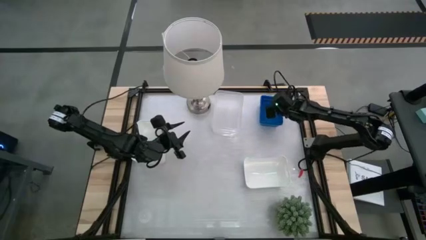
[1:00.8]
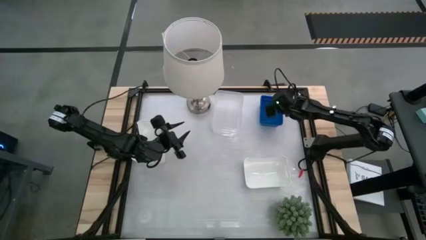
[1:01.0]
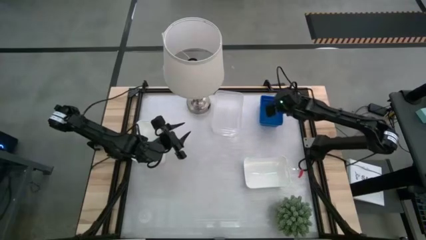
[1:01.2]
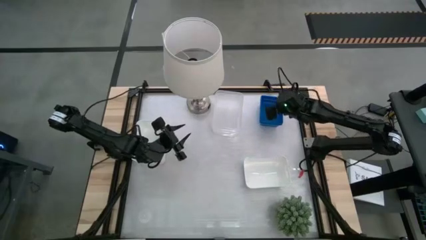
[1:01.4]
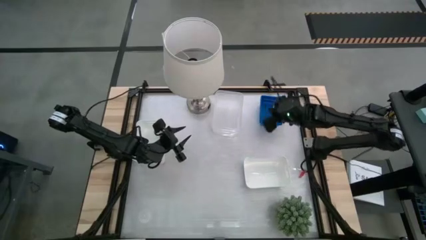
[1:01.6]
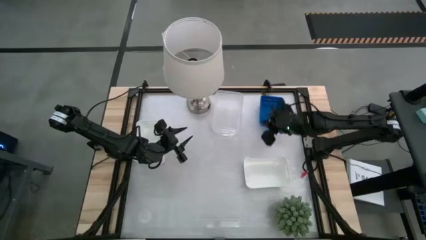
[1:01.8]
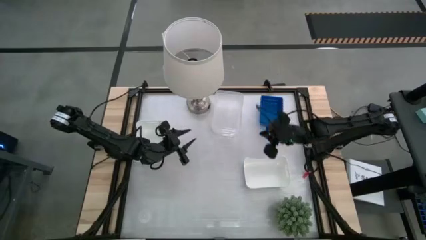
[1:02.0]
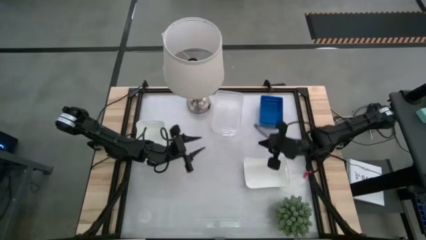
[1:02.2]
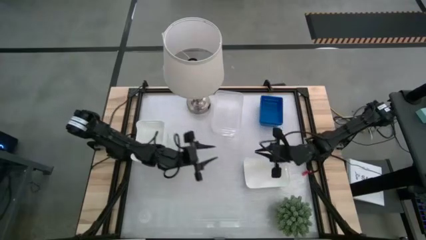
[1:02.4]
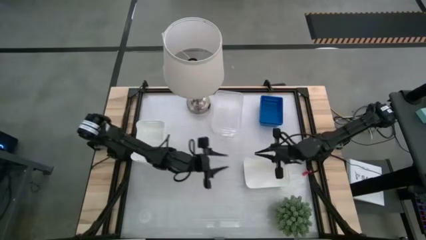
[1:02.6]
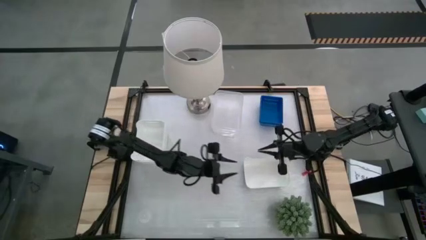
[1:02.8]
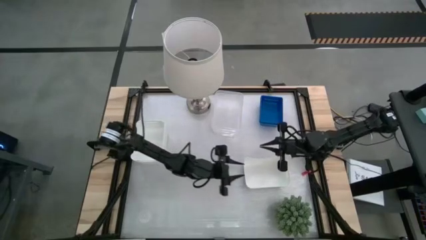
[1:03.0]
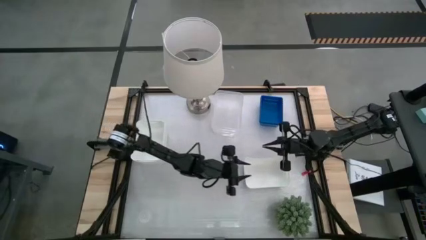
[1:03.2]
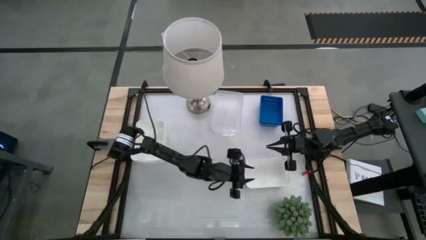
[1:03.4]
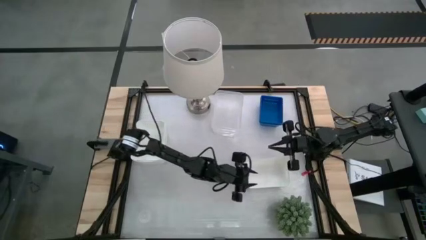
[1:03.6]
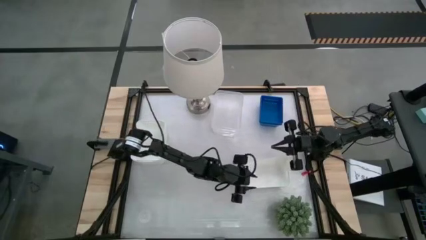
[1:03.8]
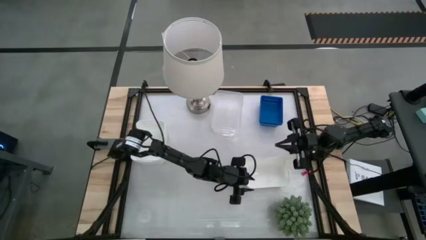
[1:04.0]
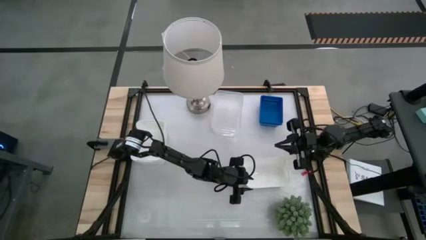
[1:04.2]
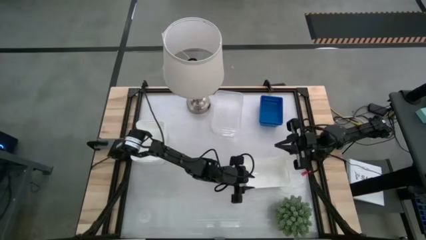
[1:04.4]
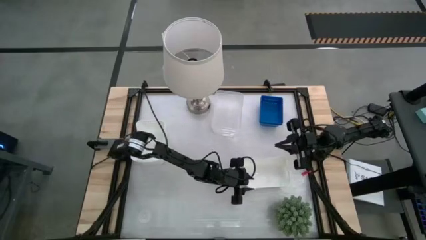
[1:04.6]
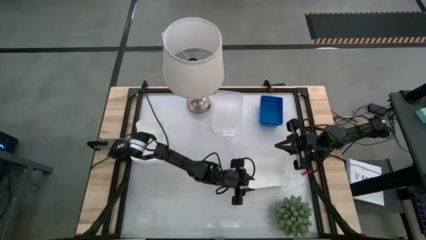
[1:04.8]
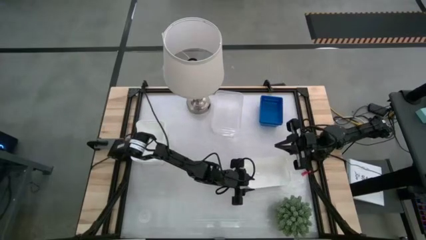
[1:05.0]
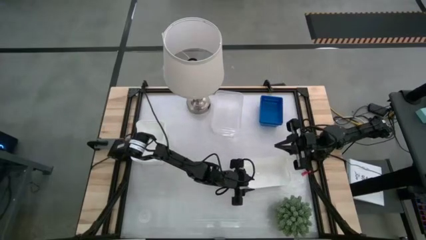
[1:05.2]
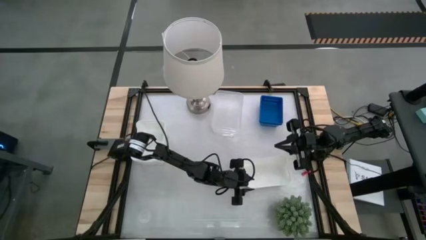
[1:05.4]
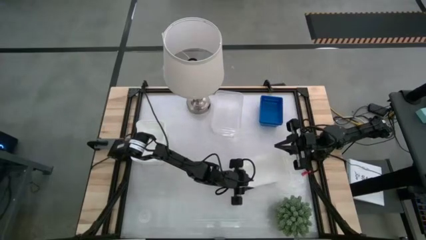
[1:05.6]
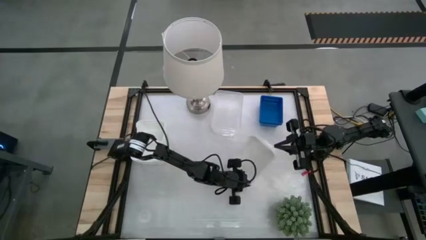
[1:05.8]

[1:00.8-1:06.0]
Stack the bottom white bin on the white bin

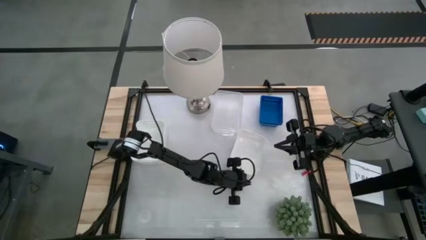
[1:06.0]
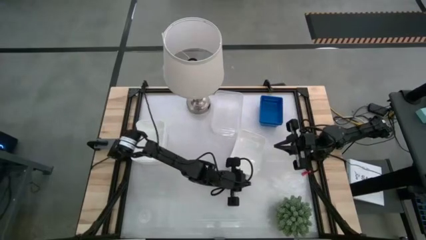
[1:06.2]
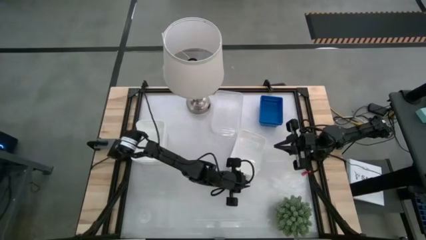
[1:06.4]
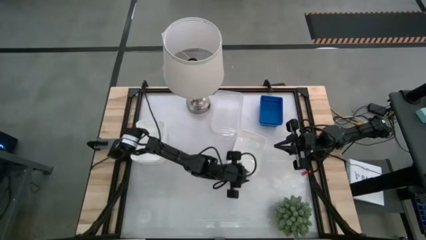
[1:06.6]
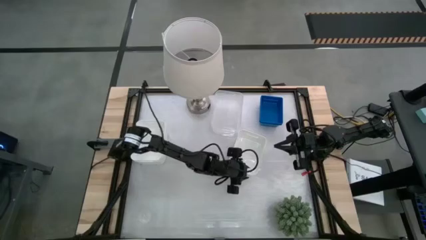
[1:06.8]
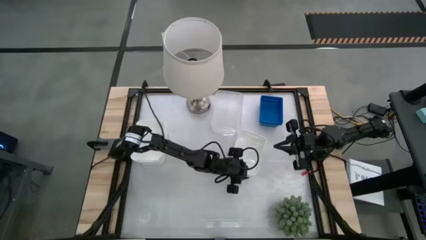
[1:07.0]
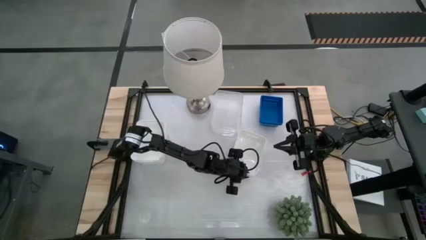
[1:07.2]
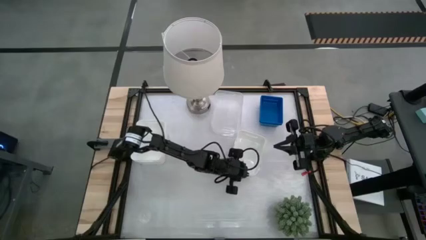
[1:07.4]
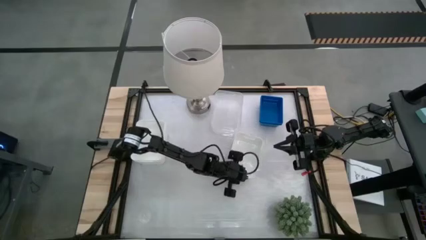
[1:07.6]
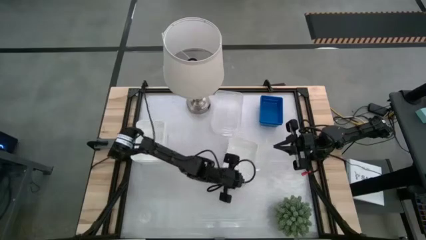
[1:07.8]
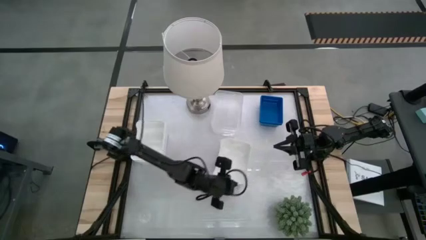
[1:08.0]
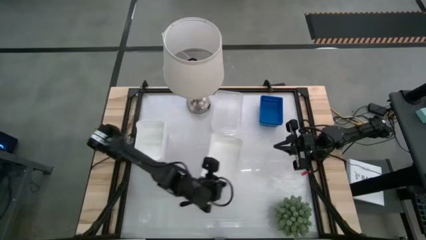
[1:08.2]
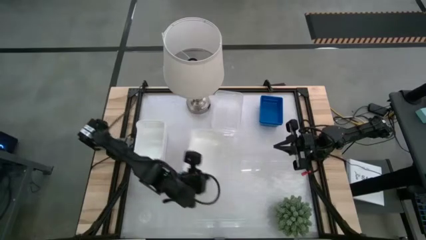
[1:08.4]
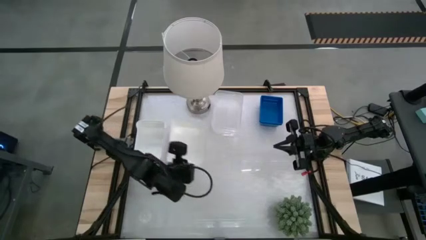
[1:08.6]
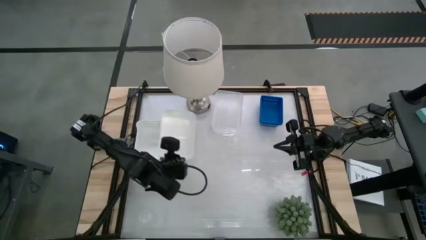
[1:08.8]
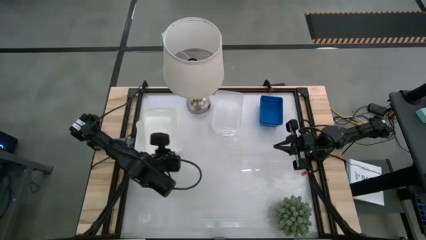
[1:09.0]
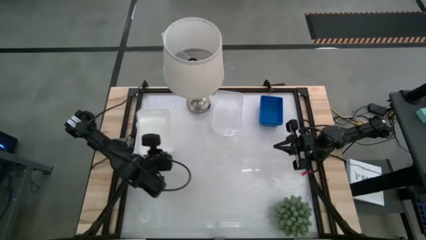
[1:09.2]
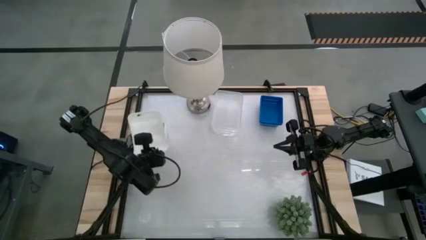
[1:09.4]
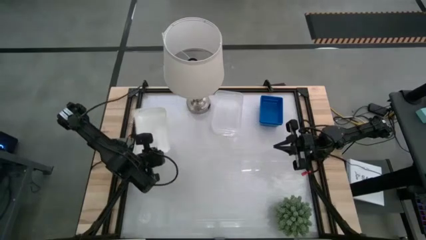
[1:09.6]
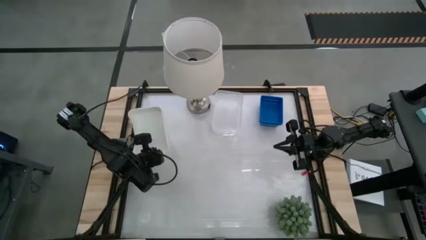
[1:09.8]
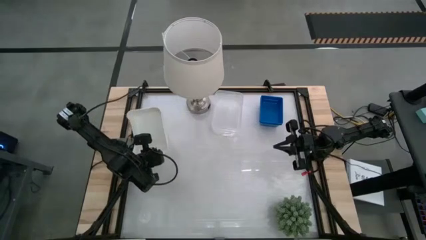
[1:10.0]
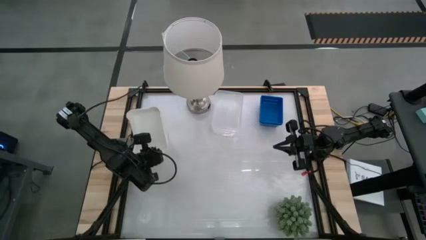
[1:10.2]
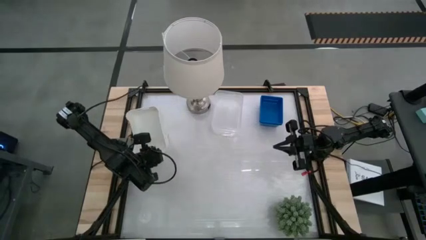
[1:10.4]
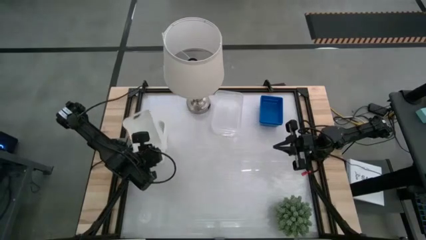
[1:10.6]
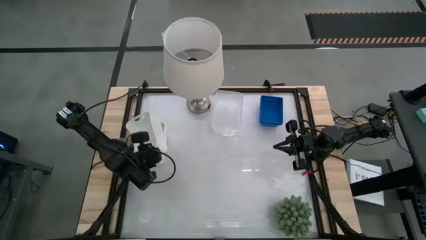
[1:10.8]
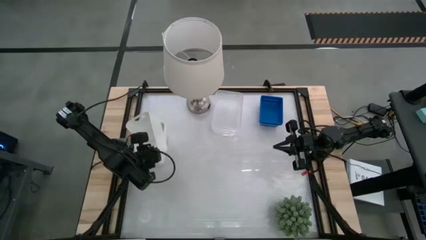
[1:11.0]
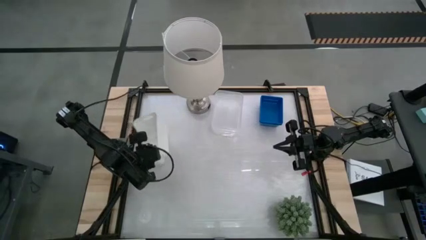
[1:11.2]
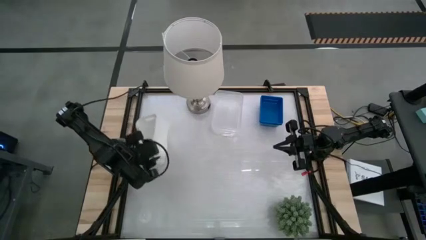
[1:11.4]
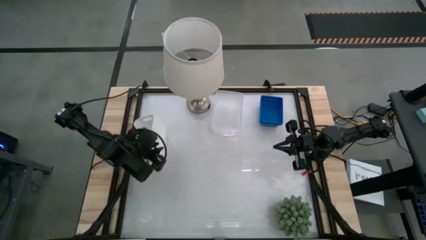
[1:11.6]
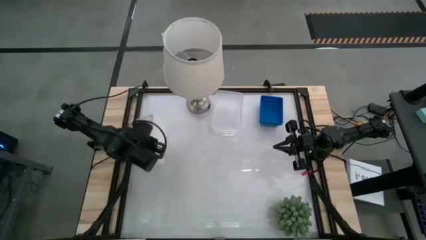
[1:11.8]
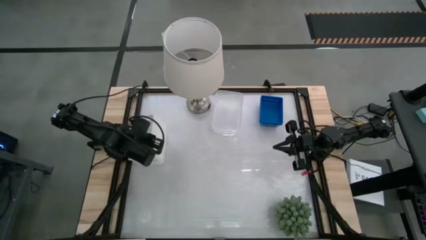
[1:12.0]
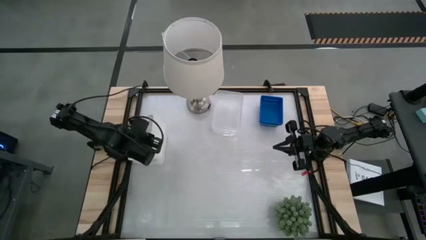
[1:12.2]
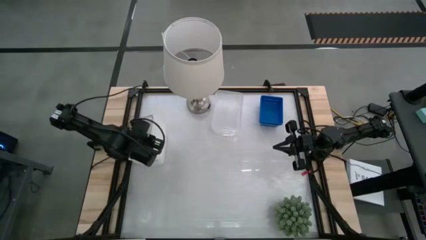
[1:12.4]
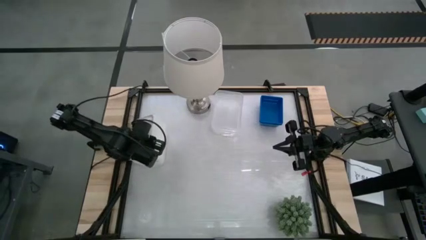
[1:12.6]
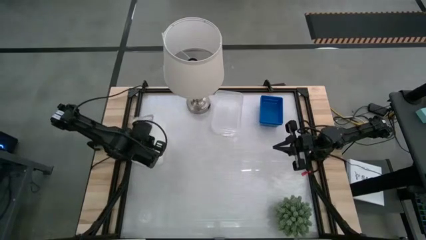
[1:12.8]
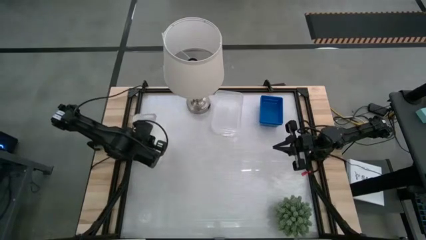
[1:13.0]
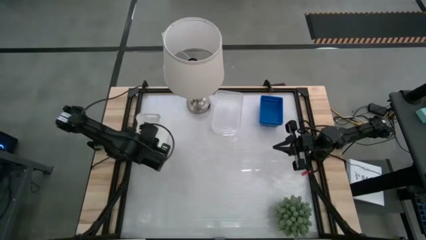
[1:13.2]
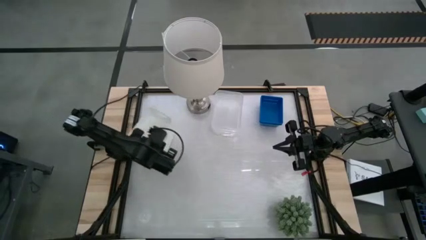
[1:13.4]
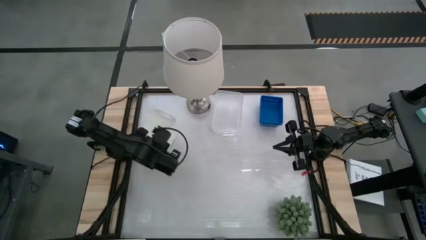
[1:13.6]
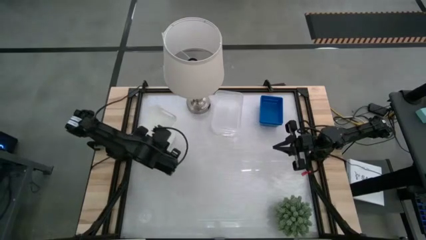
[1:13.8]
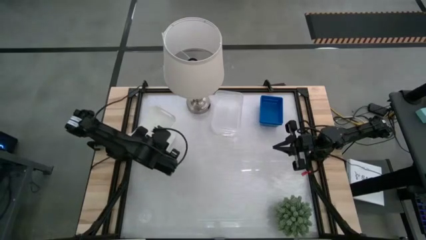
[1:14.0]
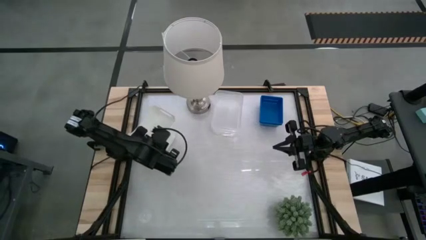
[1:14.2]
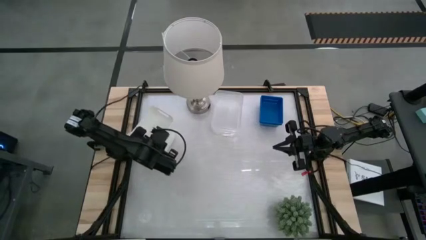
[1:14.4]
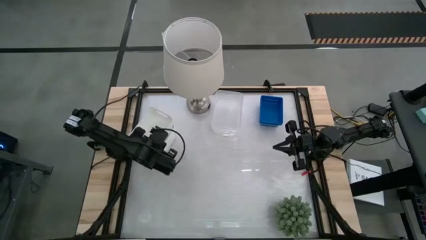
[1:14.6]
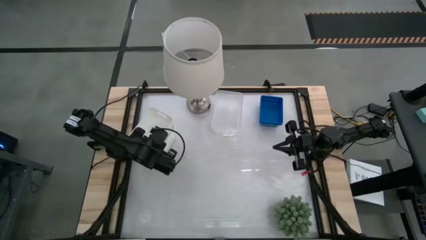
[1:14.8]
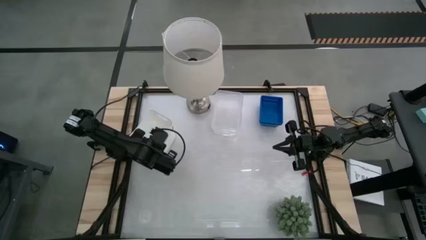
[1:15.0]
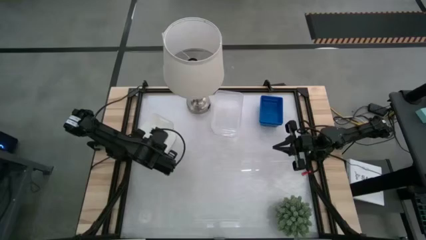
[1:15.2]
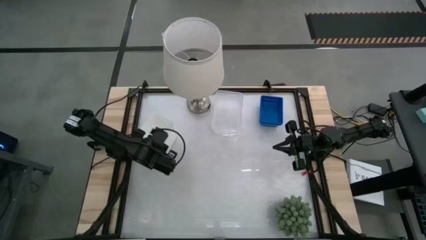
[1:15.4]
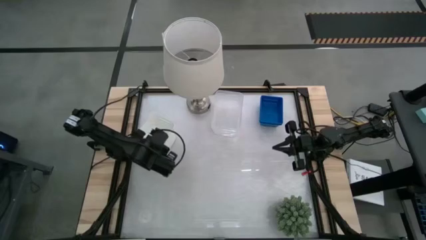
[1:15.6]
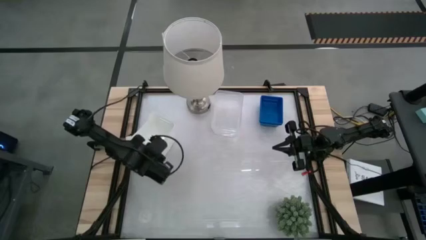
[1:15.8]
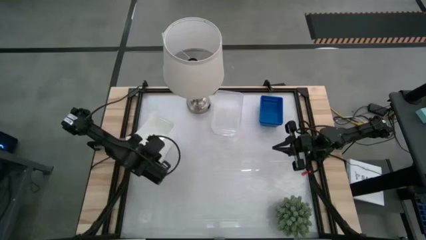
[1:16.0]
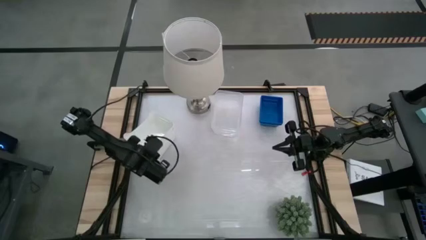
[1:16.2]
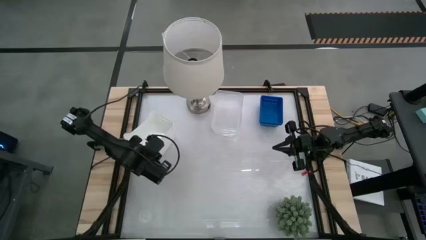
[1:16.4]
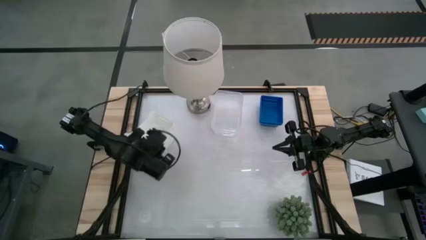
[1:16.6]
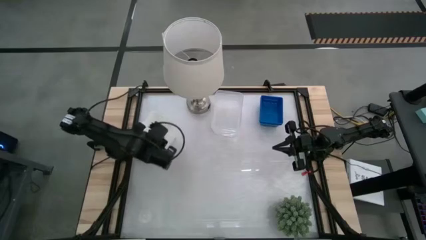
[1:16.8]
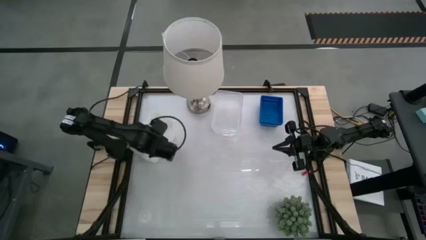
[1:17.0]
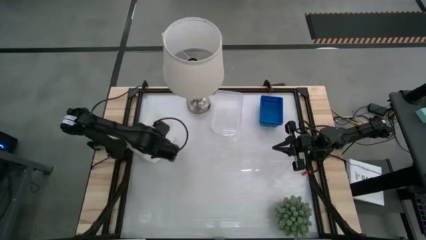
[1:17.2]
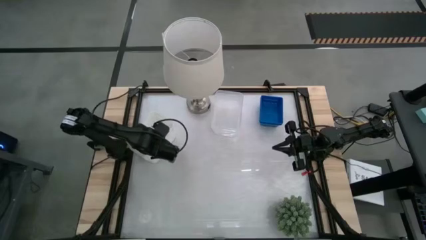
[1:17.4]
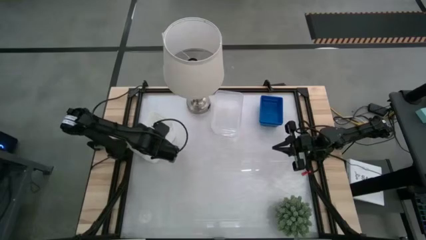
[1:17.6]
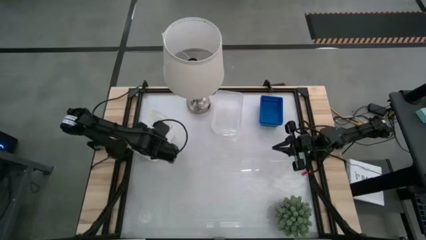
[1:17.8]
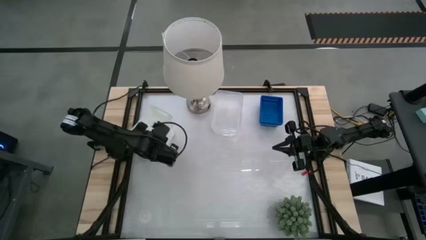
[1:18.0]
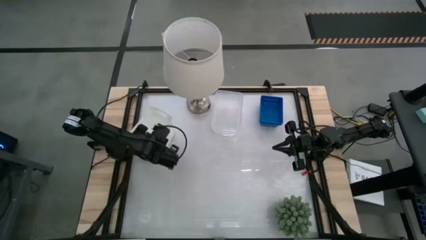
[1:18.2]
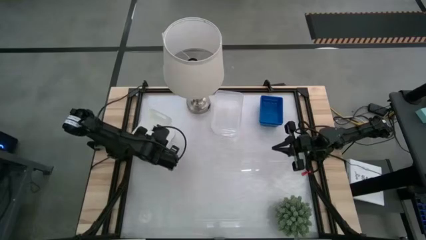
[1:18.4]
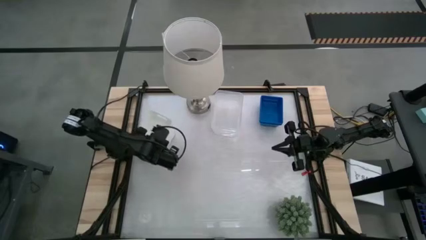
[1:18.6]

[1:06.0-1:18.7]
Stack the bottom white bin on the white bin
